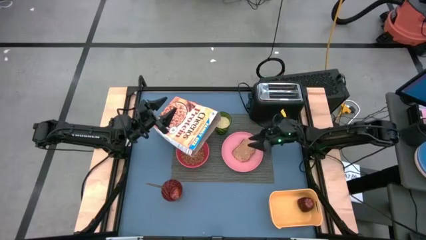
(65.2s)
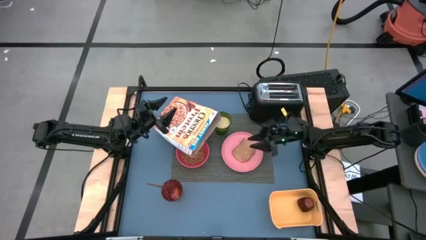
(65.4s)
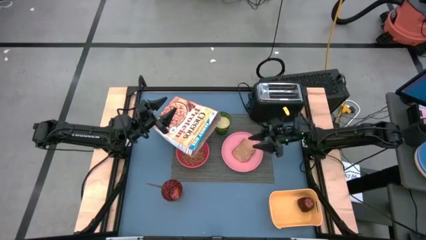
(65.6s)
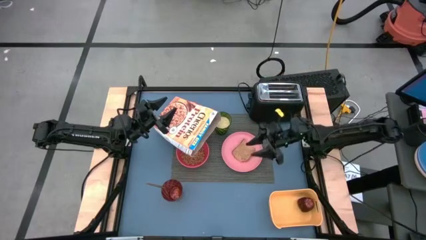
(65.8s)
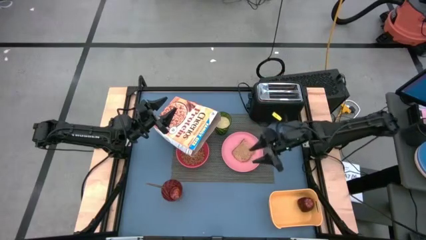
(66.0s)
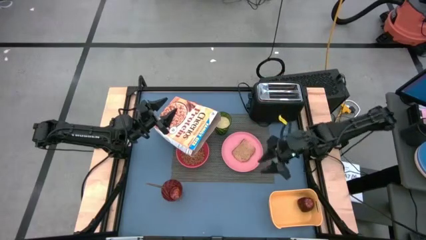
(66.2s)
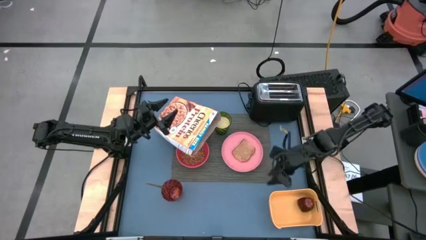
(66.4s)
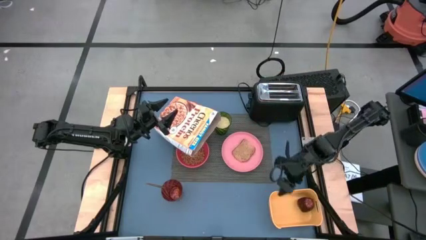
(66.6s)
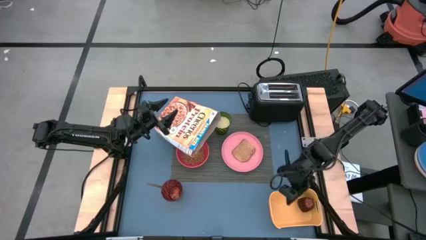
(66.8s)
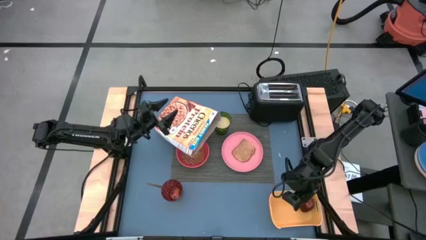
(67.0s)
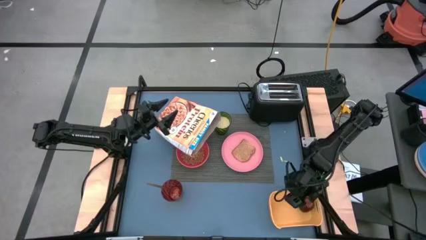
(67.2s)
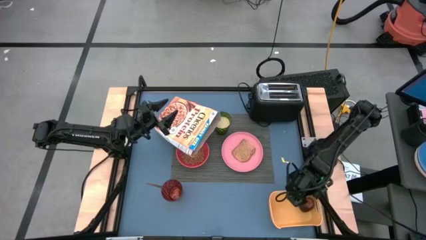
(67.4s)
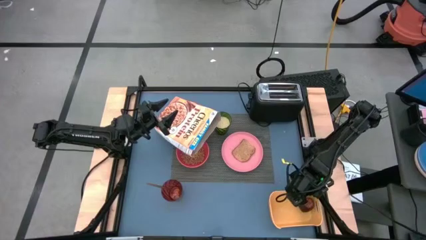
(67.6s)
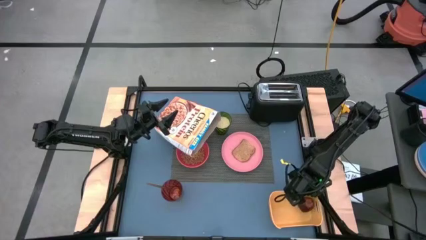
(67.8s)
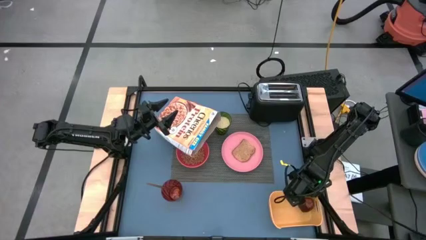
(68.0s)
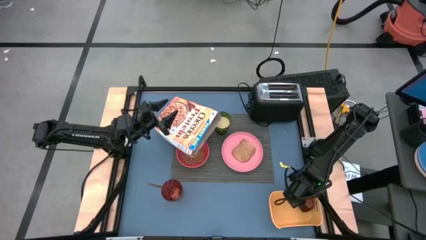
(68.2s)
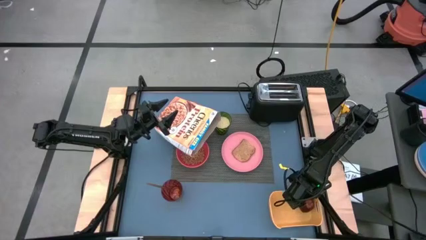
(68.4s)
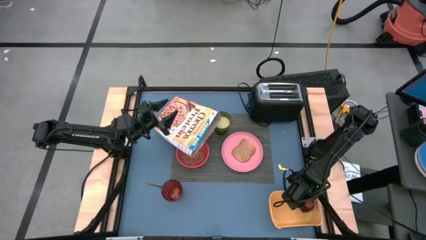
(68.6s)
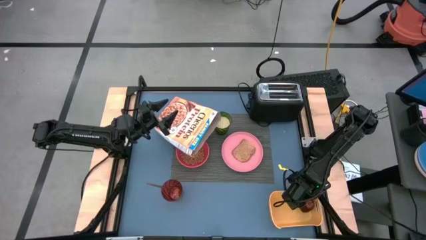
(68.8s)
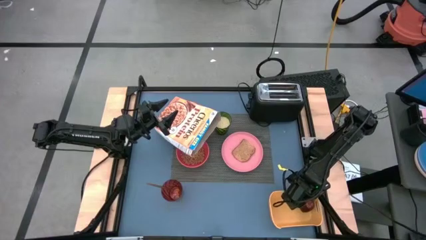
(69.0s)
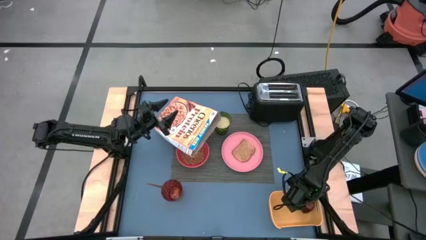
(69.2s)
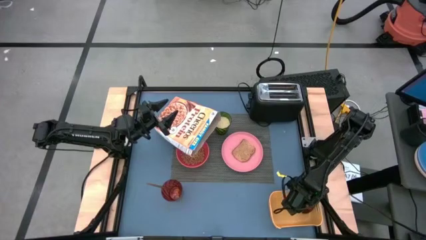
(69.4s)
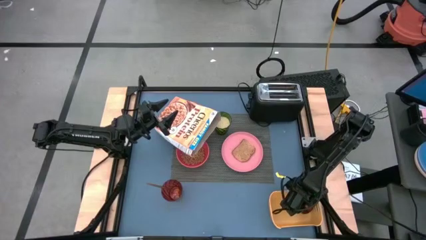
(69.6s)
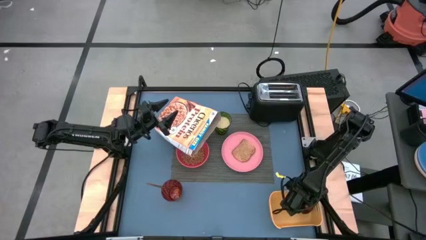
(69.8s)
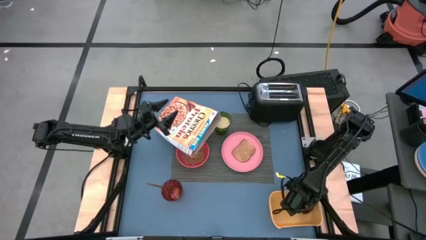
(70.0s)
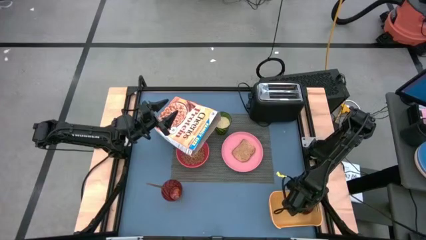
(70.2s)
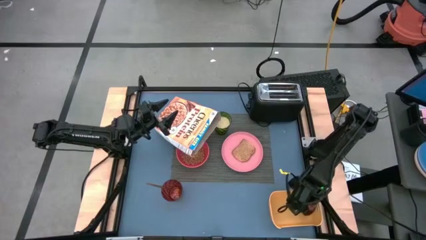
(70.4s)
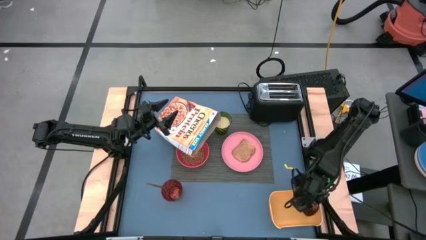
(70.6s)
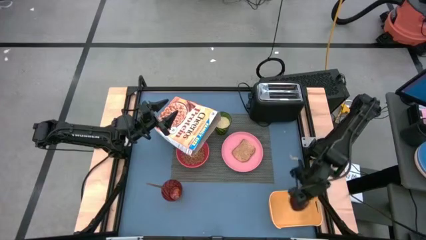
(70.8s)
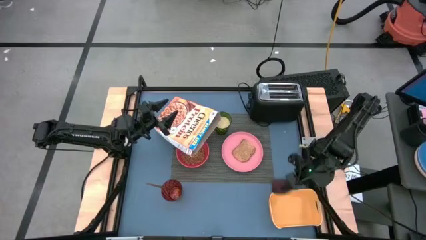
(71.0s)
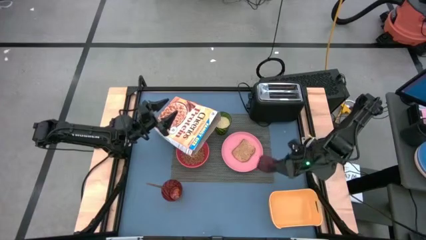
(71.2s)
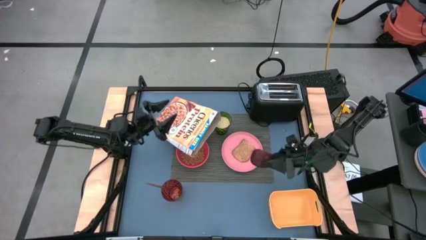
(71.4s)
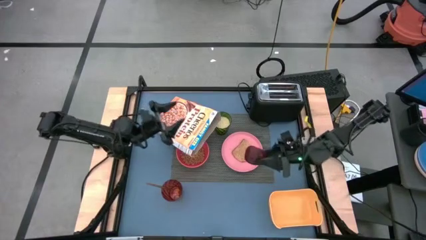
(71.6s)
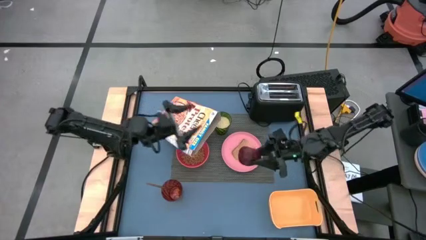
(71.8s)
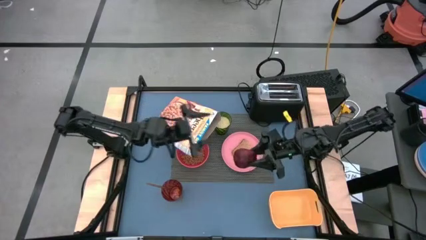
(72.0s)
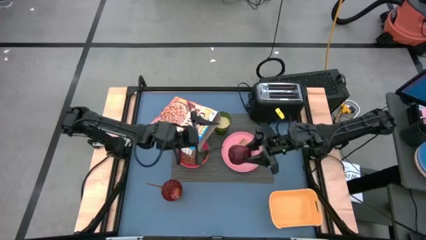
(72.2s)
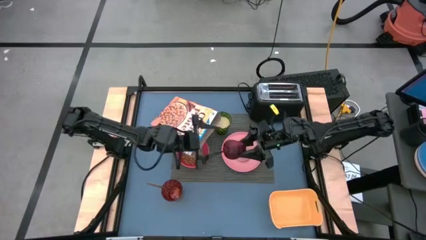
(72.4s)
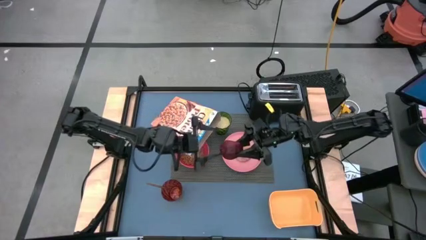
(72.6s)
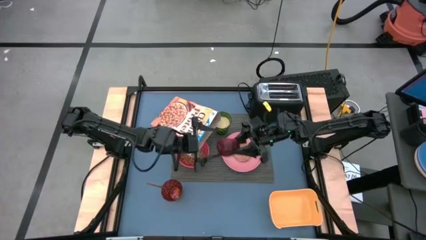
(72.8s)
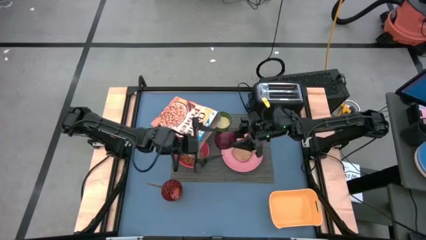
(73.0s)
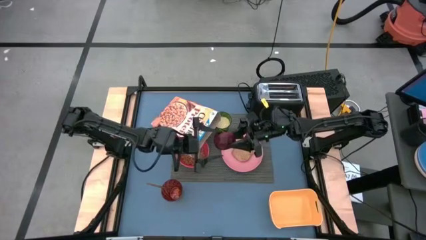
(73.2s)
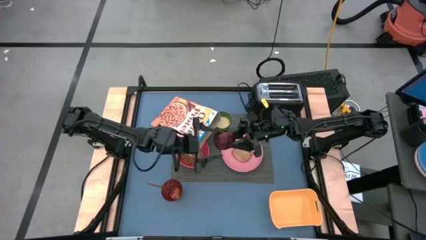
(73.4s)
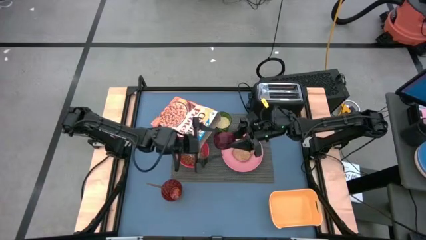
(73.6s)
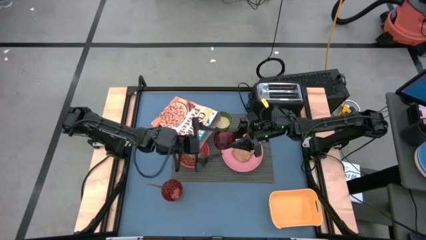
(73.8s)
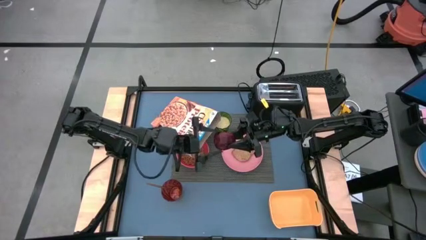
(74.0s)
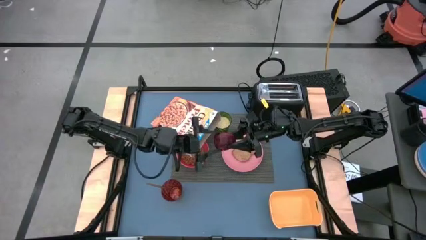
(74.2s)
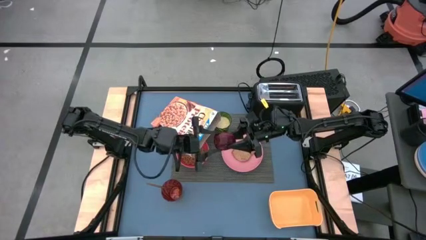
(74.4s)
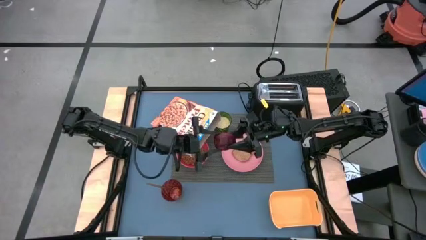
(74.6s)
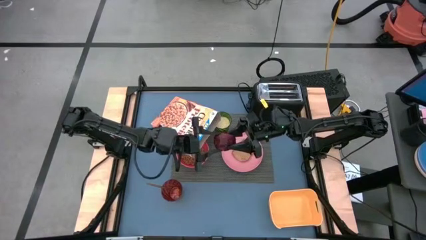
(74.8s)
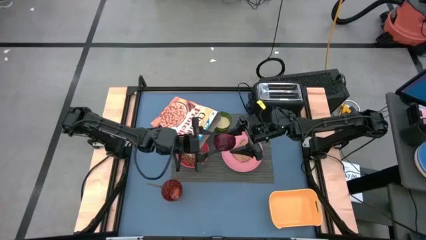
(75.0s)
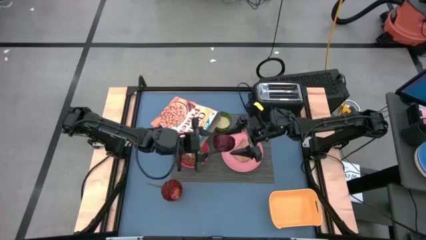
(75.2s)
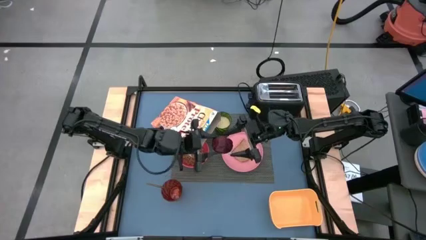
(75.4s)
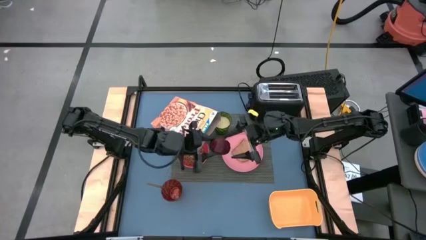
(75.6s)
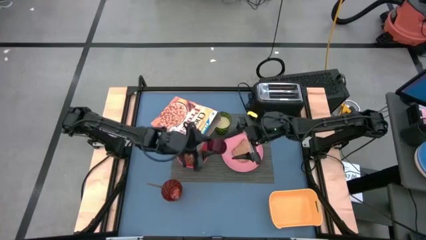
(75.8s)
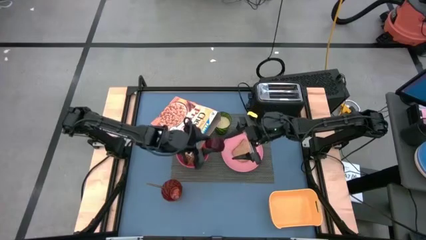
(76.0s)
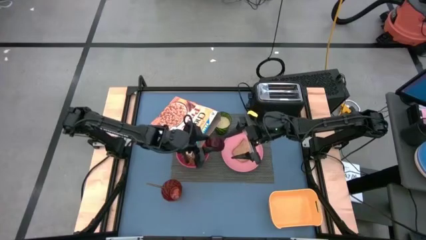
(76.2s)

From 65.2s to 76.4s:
Task: Arrange a breakfast setting
Put the apple on the placemat above the pink plate
